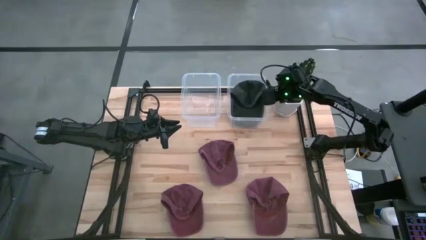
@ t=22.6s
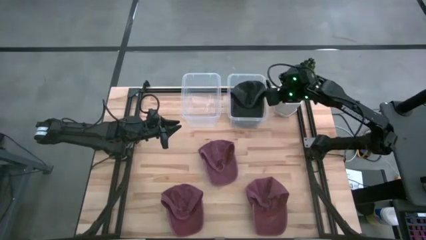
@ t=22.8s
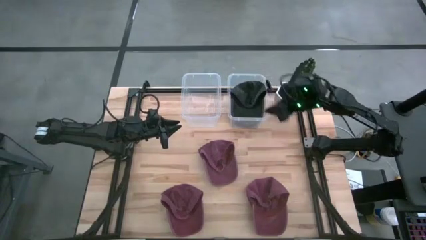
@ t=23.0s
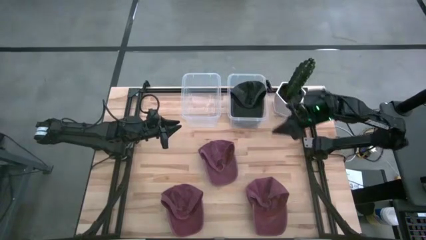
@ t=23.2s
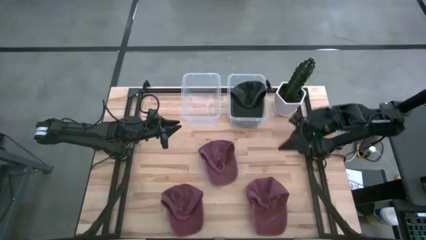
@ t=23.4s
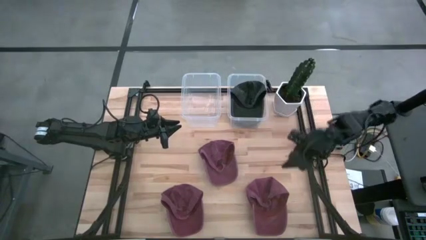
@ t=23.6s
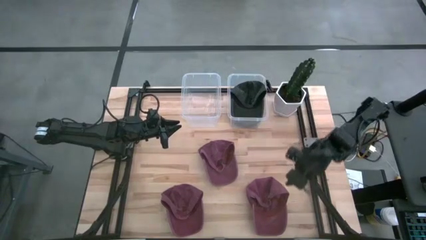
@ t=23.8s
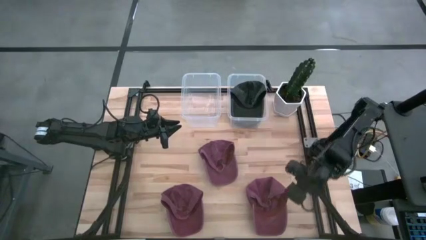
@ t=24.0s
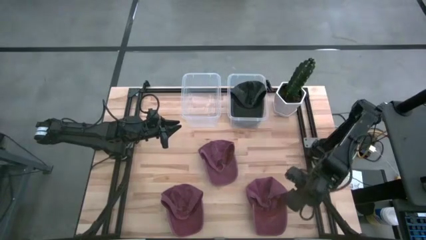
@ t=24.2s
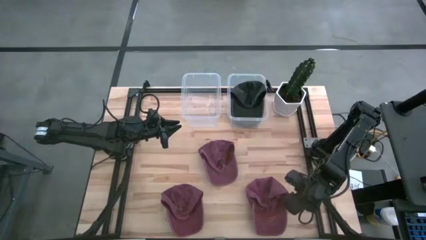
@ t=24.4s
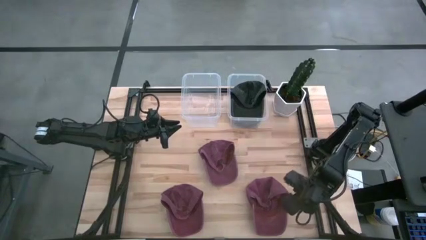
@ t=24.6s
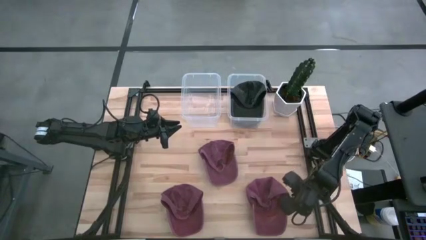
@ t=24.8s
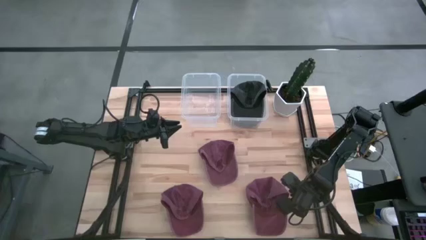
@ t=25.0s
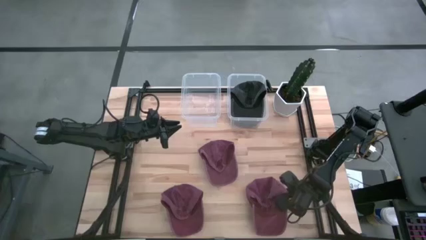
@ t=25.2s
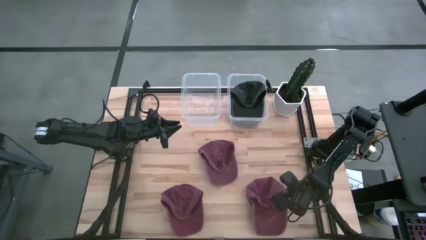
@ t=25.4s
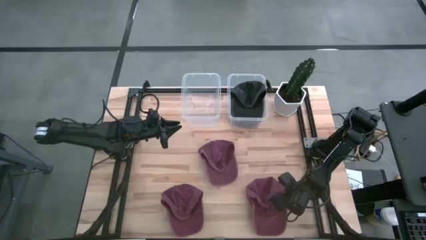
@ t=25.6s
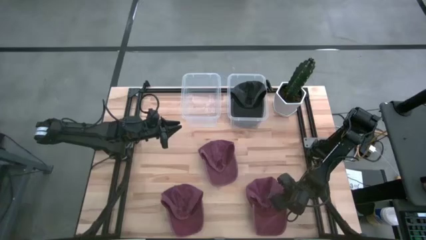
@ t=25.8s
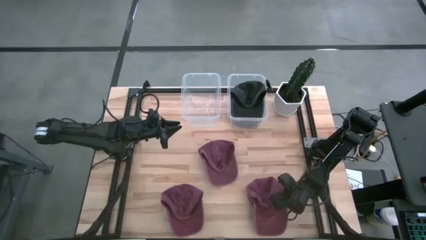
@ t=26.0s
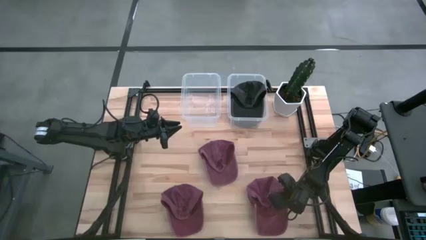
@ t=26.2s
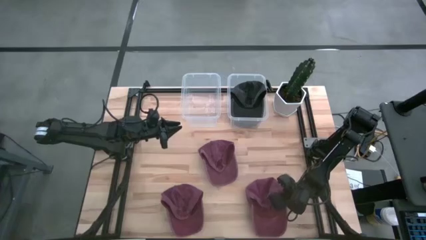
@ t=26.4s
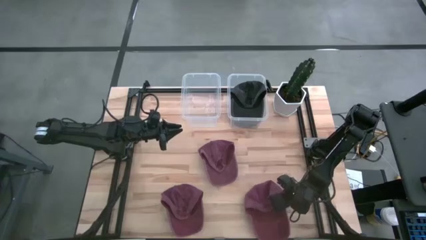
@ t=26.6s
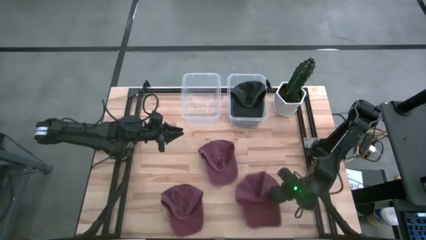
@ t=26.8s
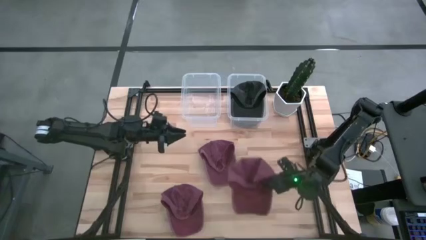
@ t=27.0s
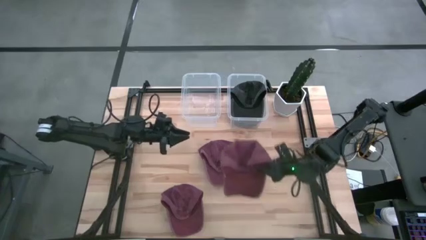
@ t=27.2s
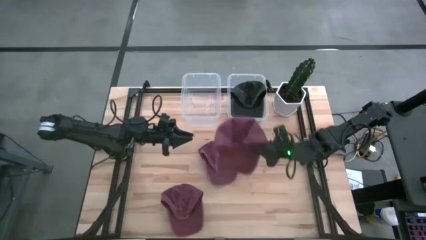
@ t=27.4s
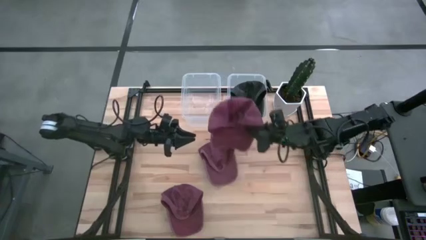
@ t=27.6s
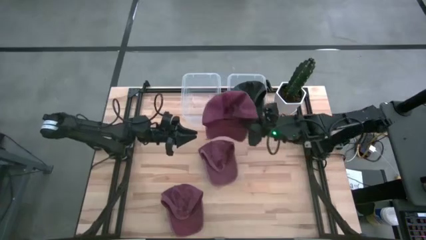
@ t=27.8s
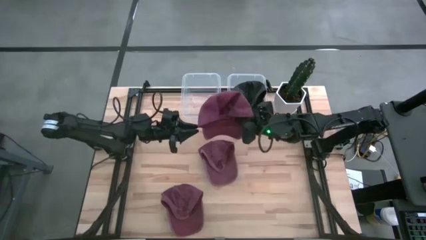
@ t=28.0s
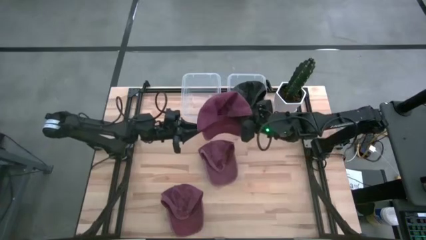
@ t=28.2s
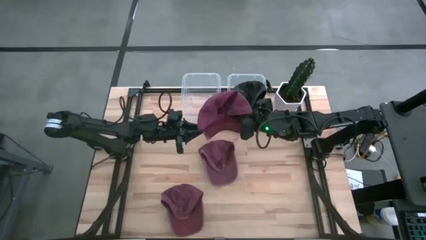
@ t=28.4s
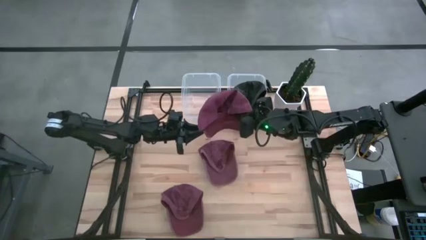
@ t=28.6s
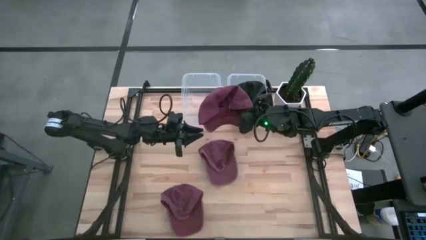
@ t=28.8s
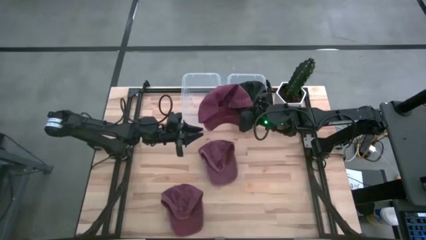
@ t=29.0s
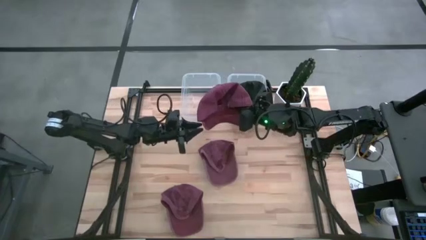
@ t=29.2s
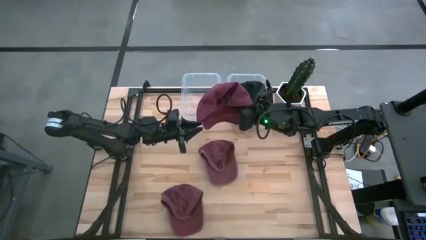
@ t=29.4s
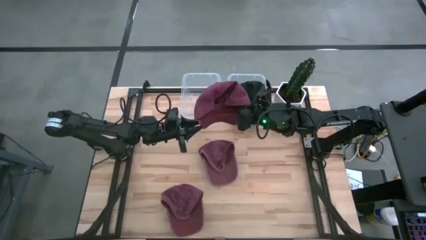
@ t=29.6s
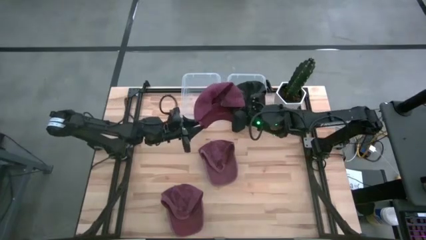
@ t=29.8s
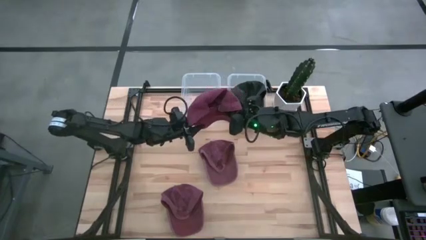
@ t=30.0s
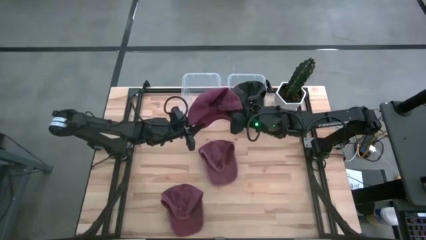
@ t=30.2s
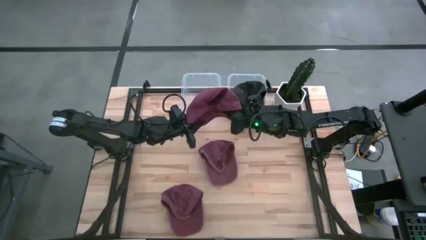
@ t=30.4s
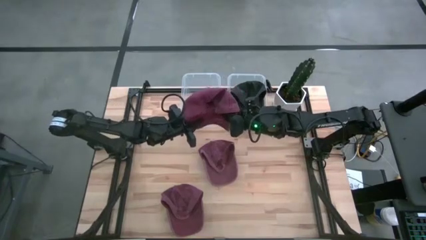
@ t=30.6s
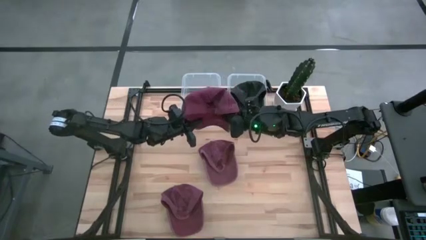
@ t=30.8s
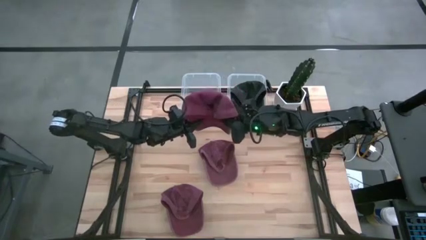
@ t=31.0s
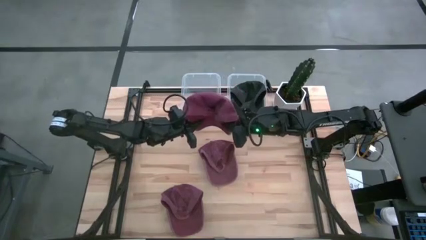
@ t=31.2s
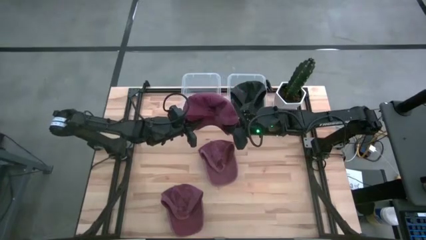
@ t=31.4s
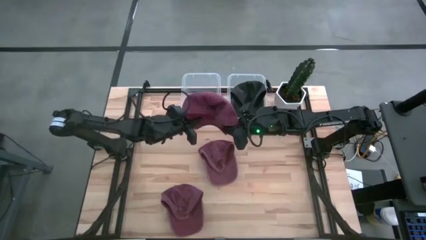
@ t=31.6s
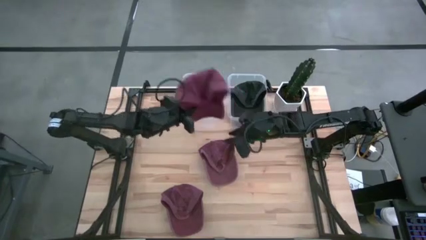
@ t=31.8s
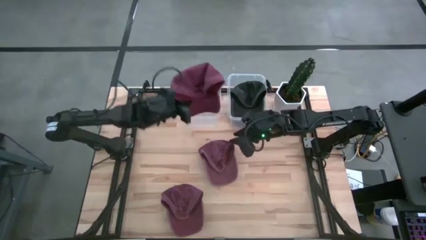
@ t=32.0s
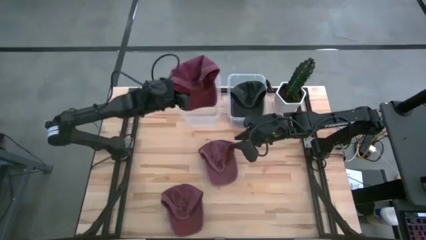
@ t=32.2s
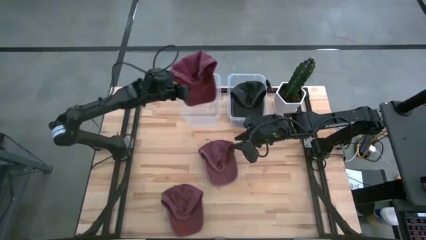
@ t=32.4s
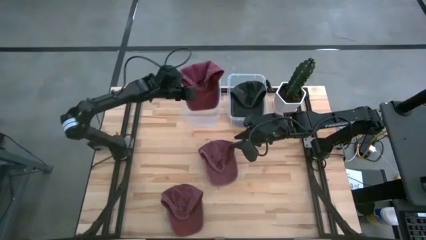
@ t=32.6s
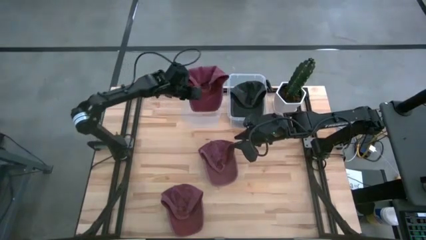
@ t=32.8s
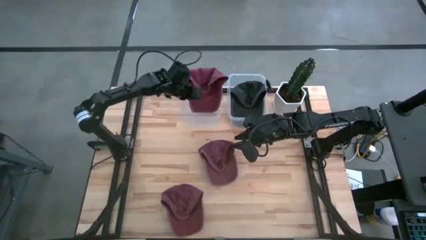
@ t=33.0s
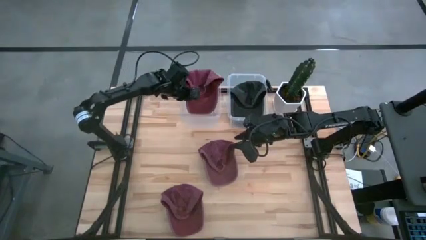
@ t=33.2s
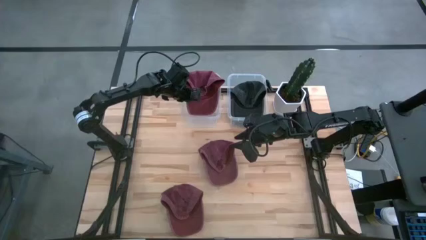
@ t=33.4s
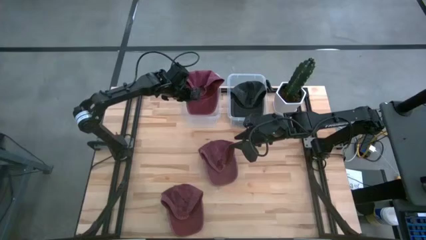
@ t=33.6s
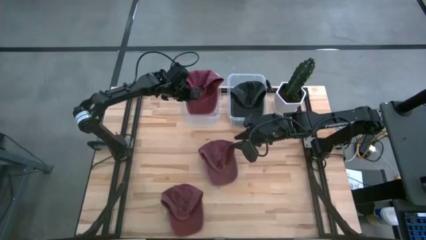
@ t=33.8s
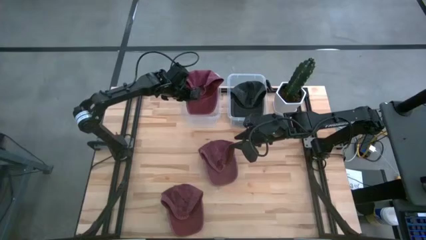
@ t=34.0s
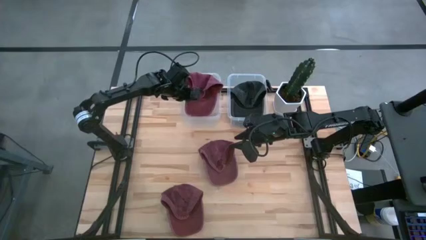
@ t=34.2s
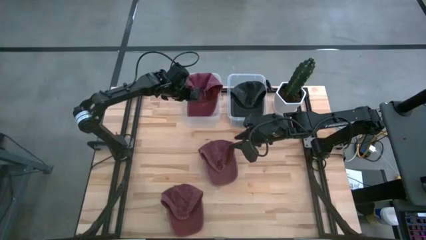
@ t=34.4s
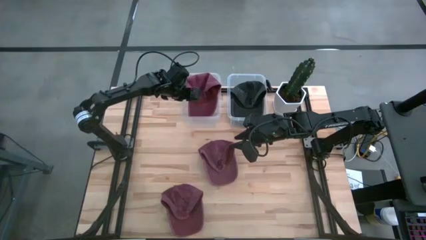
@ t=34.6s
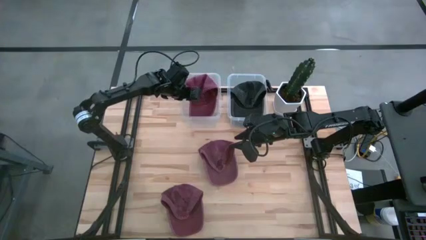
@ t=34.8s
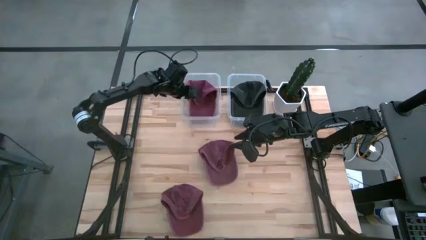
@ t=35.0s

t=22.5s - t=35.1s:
Task: Pick & Place hat
Put the bottom right red cap into the left transparent bin
